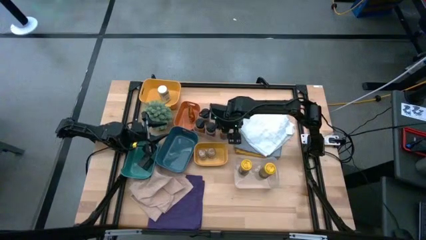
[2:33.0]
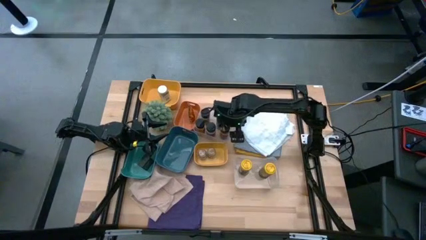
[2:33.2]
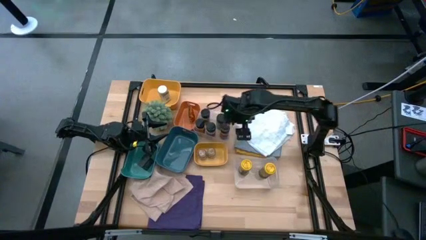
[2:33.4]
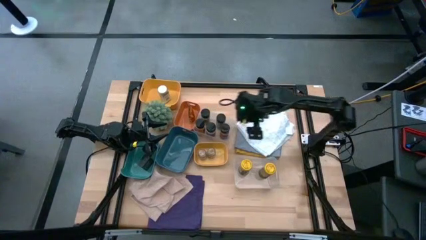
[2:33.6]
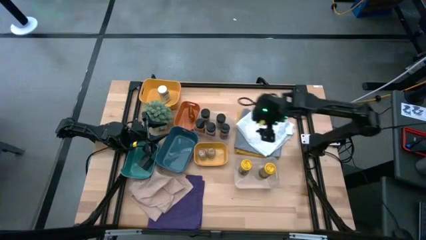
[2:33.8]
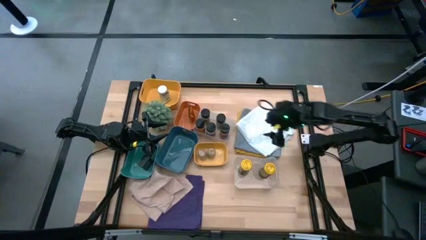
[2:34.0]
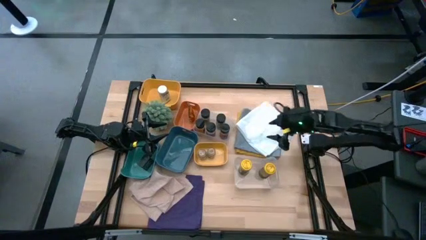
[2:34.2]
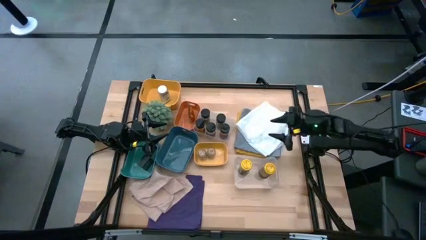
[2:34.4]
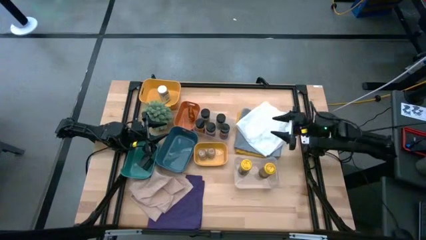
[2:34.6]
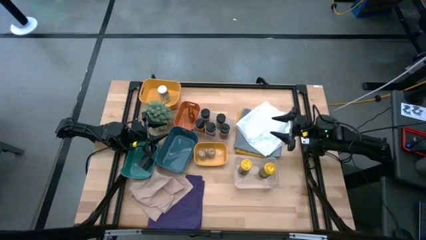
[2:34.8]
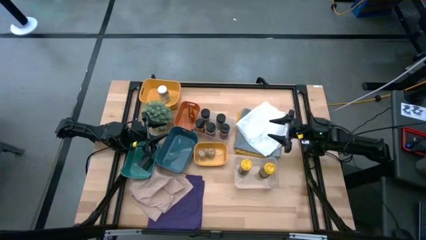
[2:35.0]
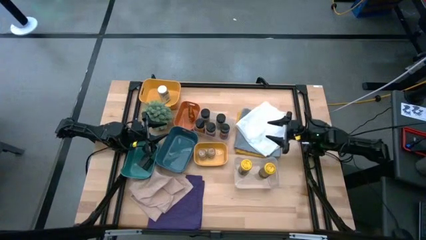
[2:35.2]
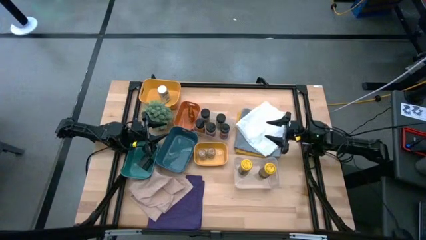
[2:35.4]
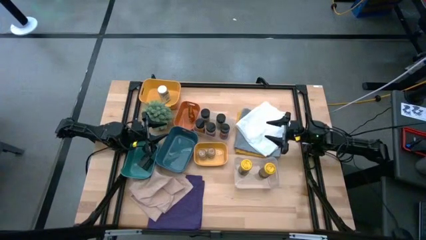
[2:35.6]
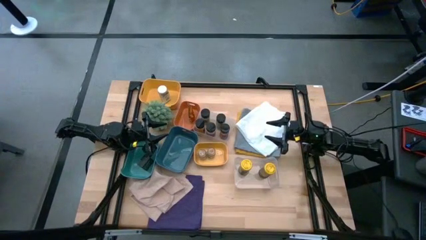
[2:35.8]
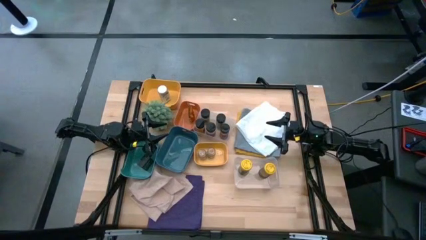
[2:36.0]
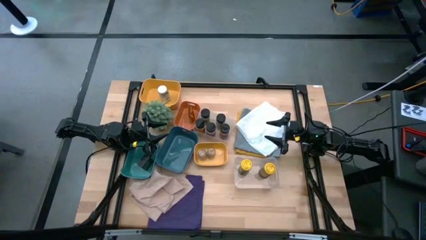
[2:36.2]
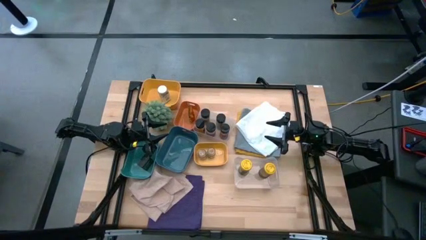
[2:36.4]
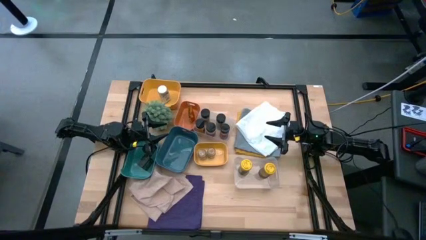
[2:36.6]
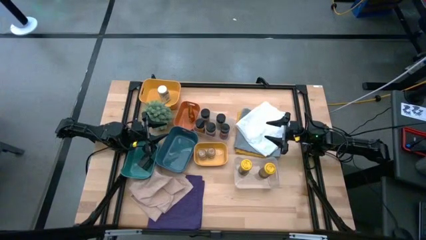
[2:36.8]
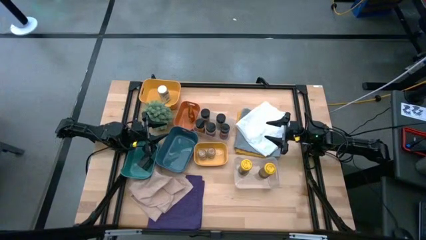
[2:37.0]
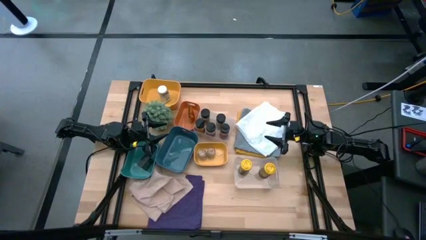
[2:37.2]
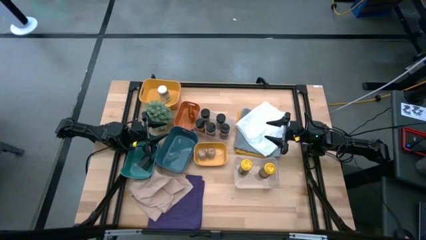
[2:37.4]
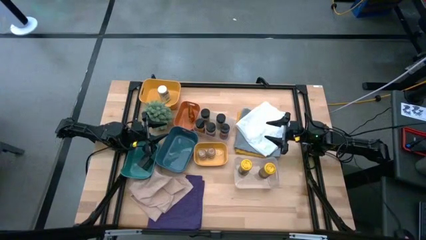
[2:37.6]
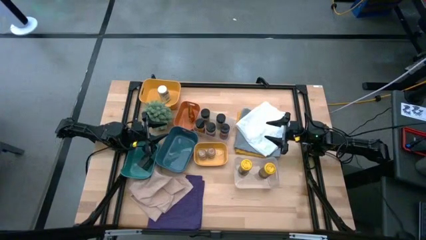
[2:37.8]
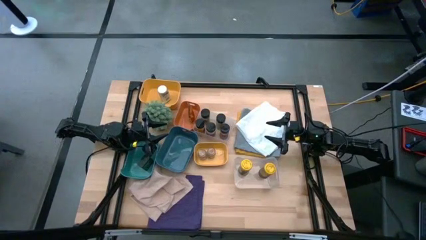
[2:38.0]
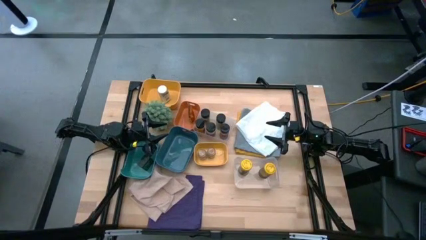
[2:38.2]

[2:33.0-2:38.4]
Task: Sort spices by type
Return to Home Position

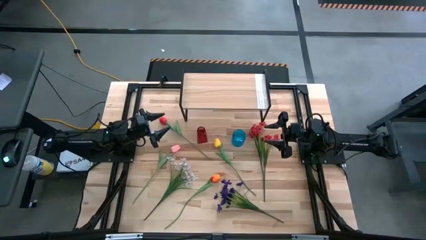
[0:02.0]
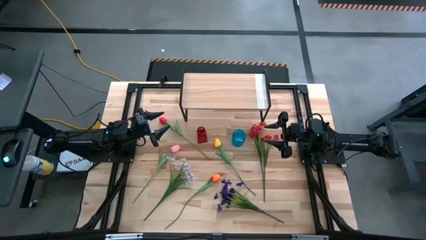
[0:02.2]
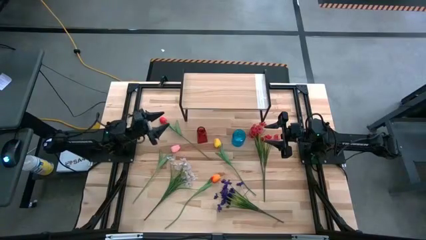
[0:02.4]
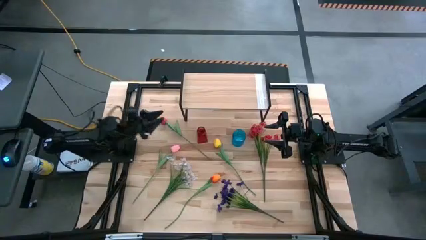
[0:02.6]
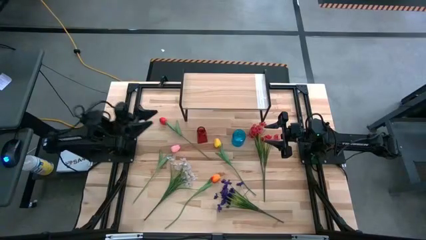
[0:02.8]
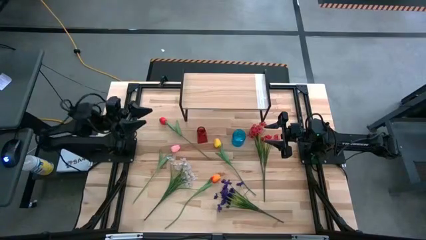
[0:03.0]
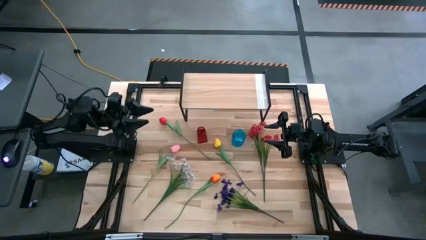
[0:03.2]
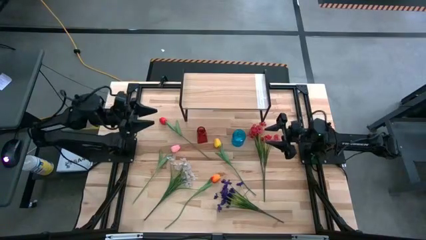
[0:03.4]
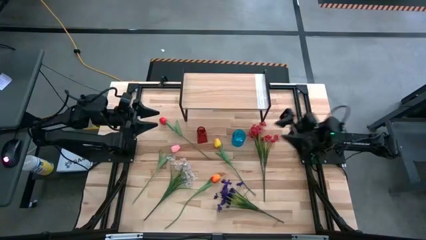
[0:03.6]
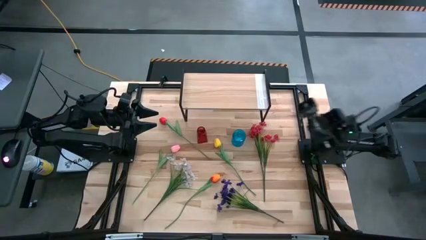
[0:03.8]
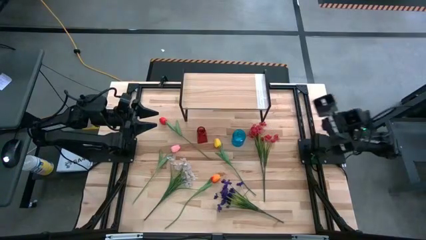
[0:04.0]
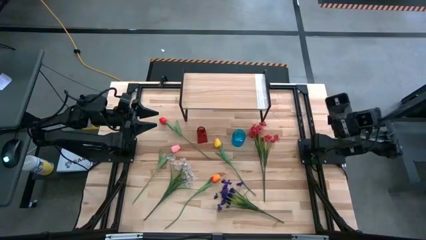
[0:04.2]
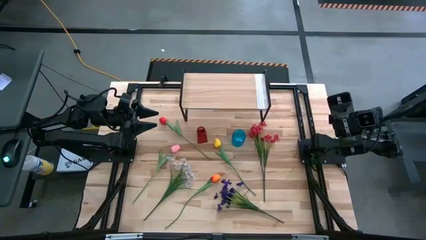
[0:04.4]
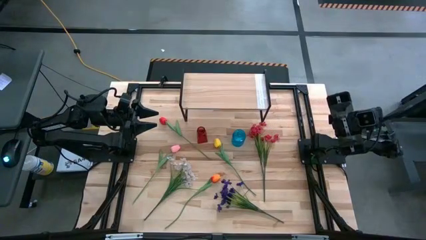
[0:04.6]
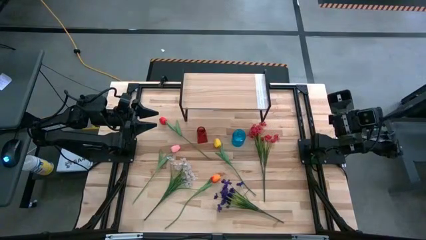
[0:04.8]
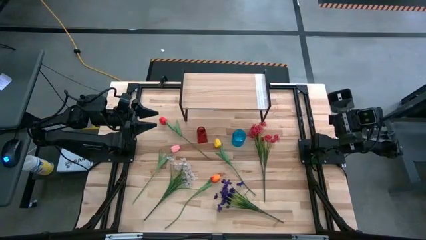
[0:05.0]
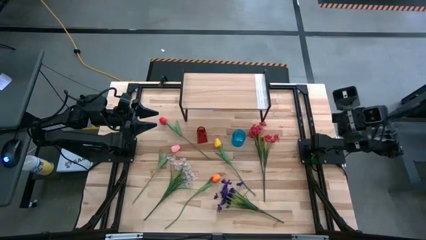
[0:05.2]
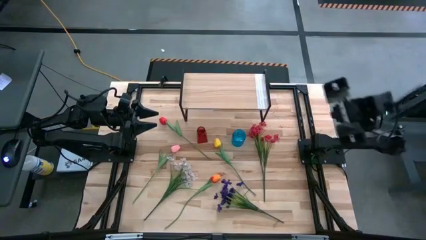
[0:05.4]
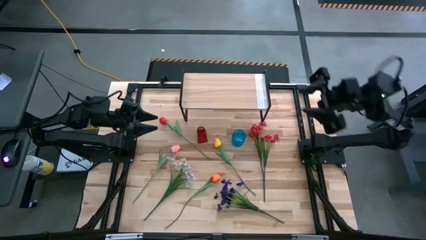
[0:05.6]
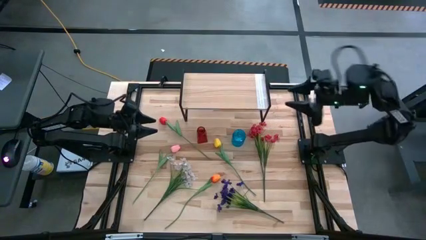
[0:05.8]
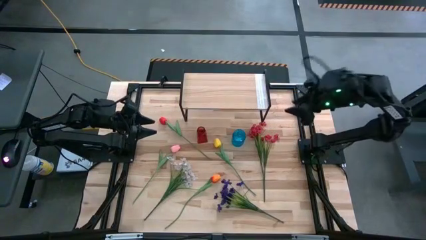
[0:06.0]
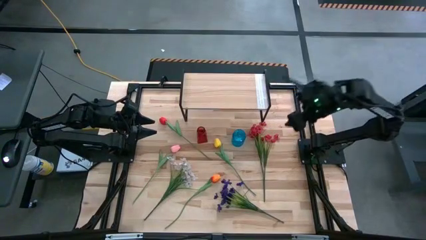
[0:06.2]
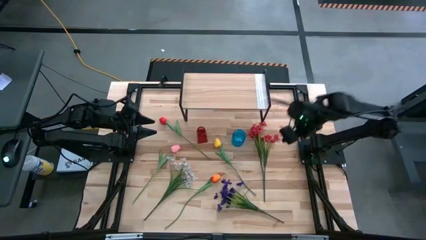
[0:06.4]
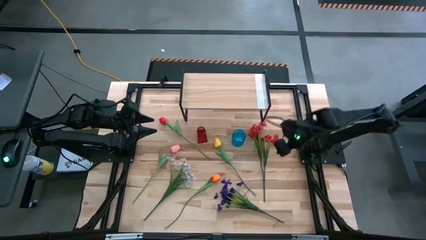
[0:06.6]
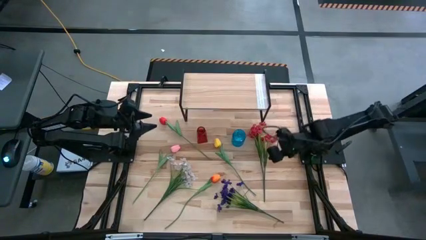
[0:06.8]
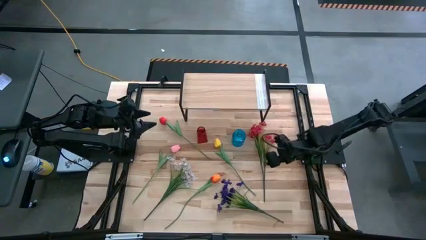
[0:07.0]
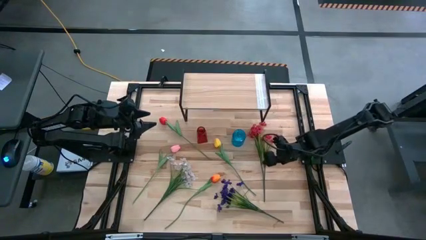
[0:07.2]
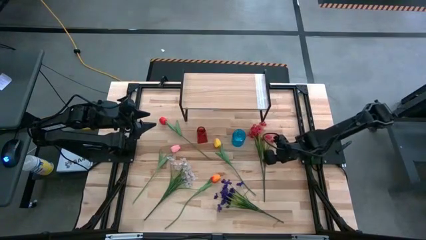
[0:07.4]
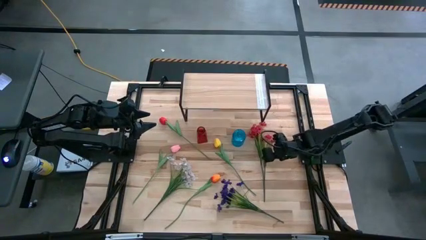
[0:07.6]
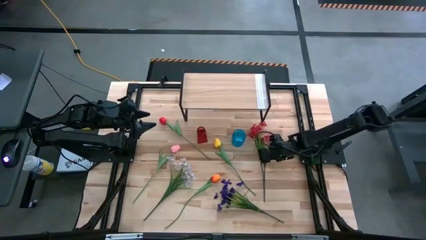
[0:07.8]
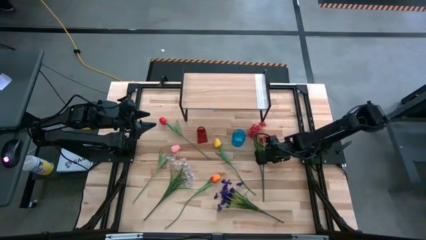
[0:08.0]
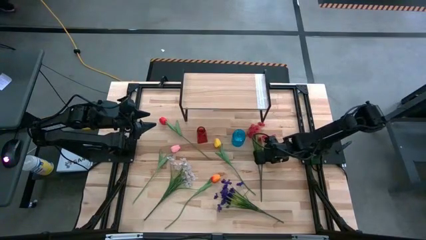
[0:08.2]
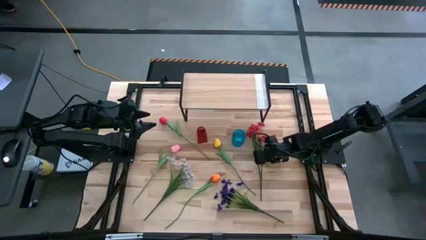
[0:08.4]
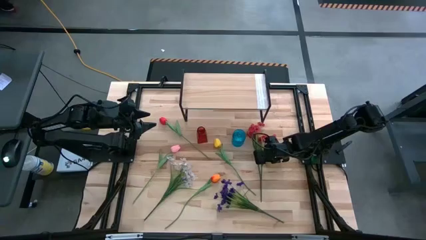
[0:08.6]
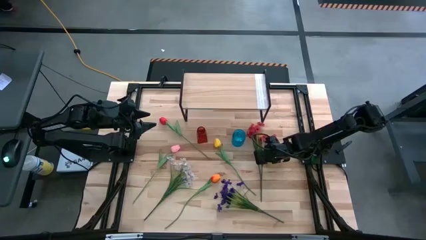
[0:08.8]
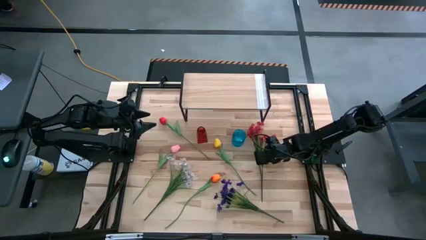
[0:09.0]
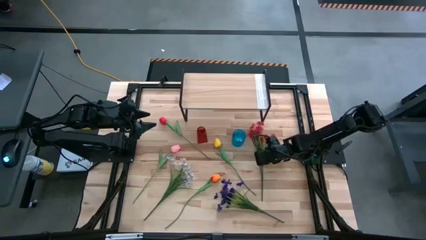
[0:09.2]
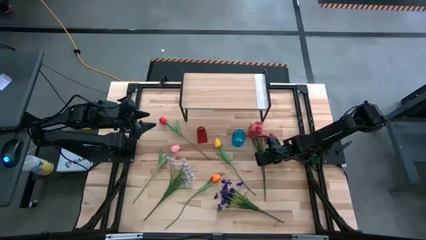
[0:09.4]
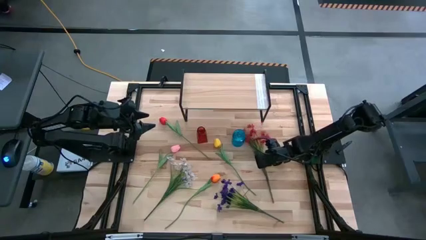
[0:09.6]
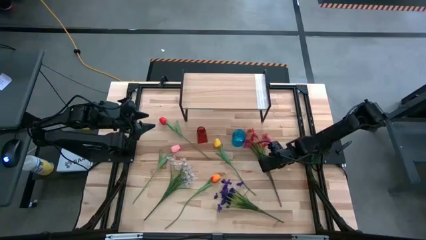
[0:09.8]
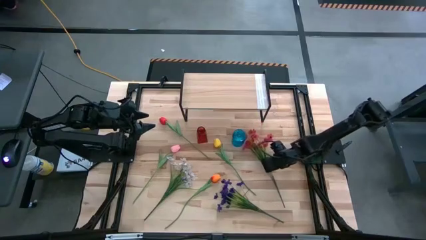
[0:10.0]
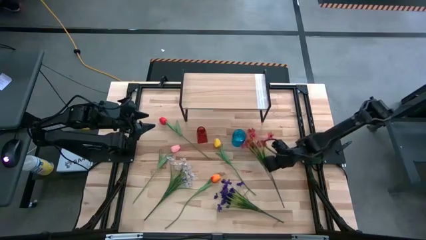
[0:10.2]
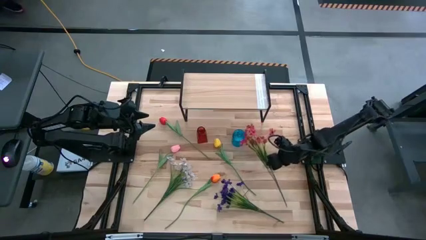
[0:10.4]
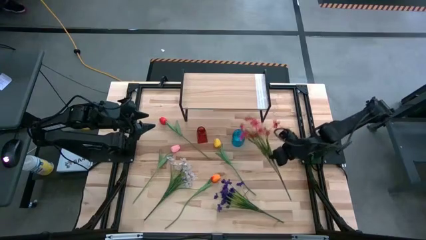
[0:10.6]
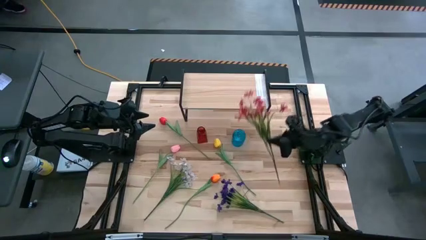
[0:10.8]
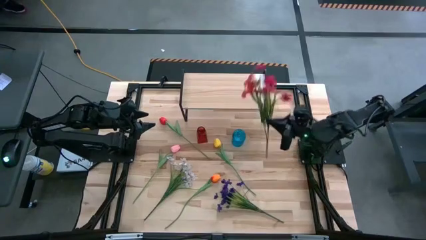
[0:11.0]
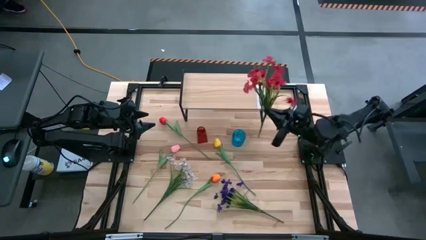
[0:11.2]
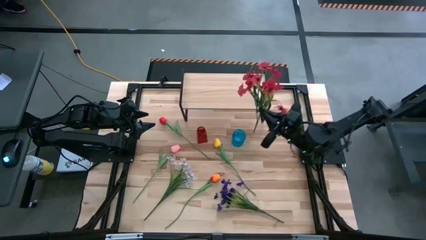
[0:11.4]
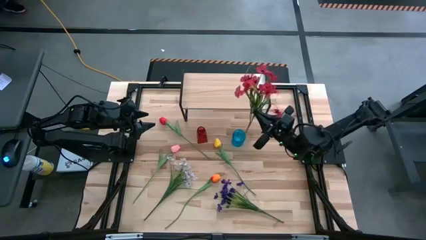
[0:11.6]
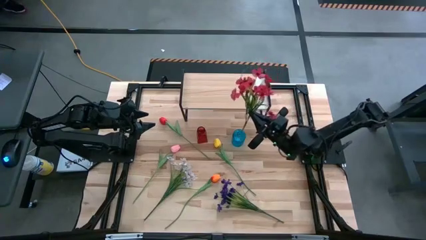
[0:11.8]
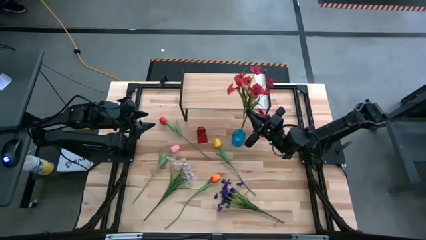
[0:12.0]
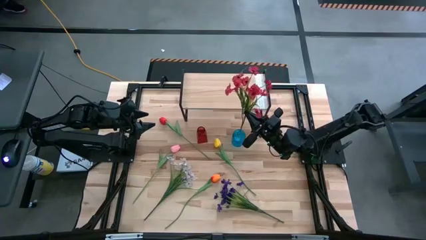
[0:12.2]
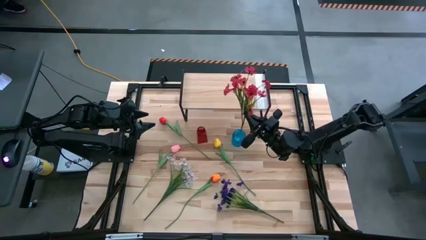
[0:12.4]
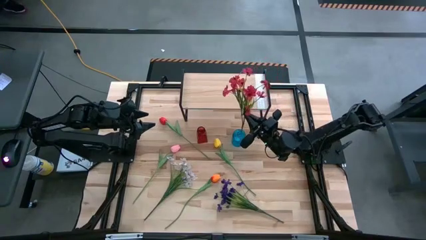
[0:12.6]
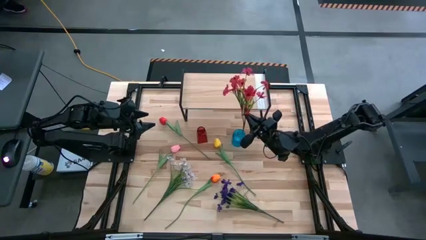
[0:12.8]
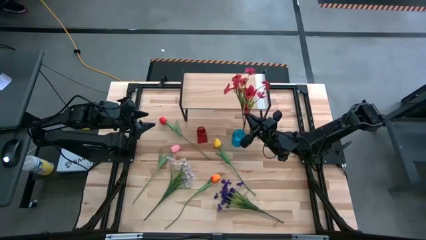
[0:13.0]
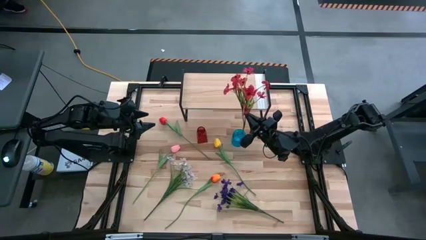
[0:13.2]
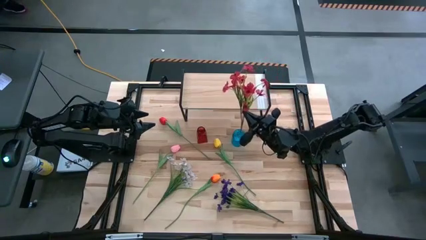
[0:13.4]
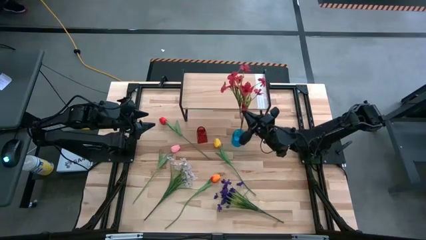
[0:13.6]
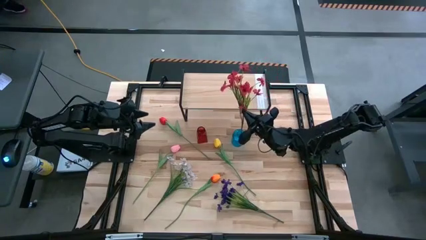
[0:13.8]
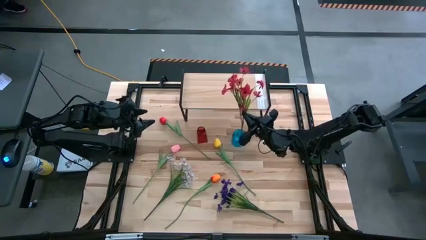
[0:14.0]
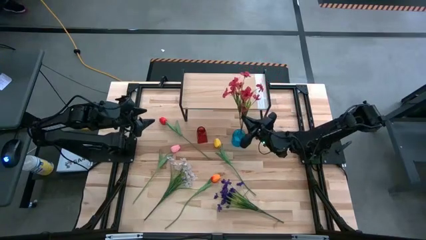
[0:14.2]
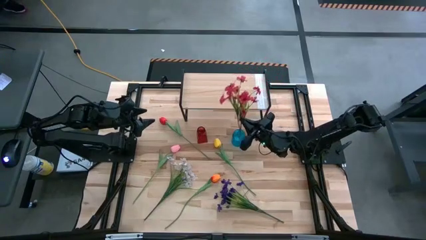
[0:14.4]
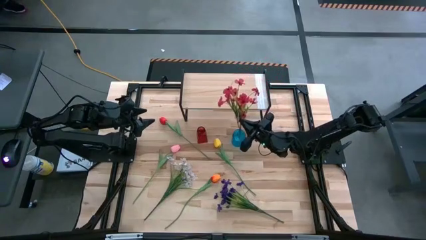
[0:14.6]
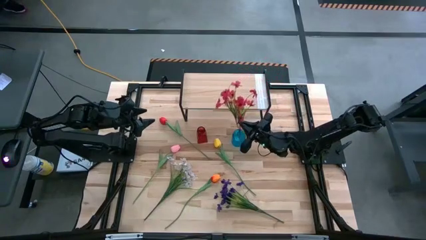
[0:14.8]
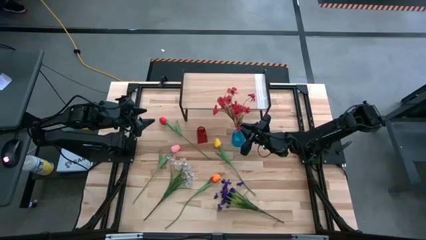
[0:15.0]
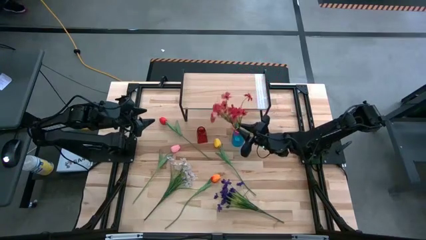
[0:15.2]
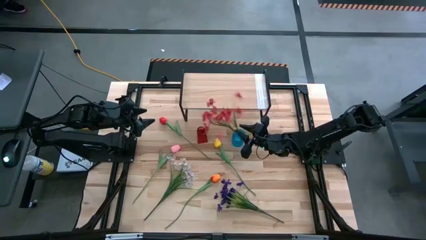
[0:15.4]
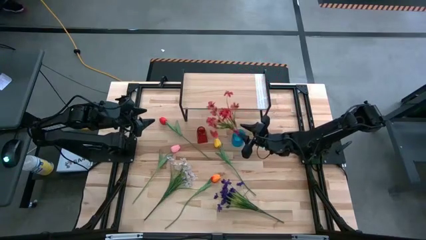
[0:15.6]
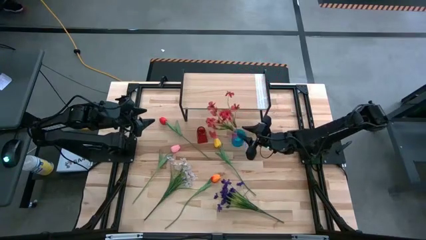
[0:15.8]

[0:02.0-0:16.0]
Task: Pick and place flowers into a vace then onto a shelf
Put the red flowers into the blue vase
